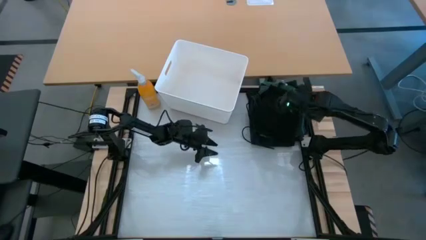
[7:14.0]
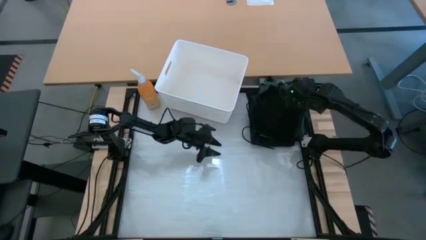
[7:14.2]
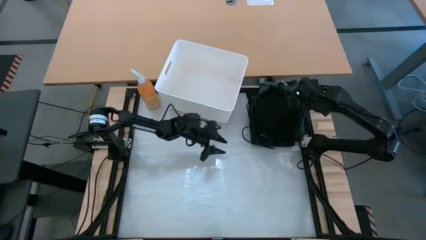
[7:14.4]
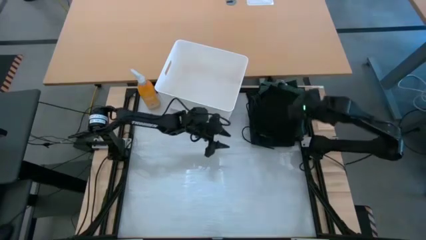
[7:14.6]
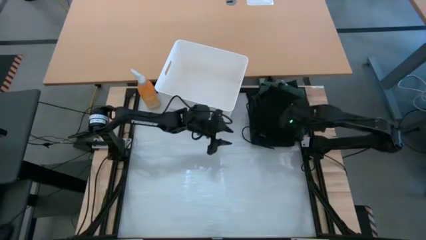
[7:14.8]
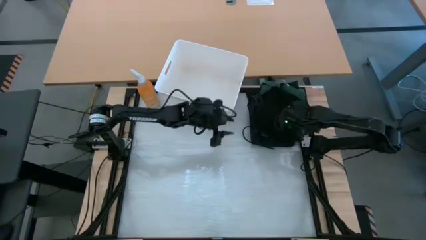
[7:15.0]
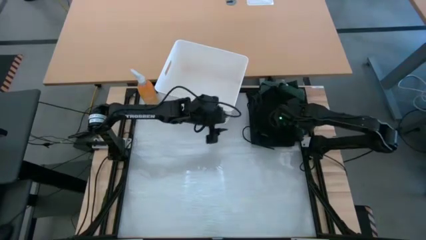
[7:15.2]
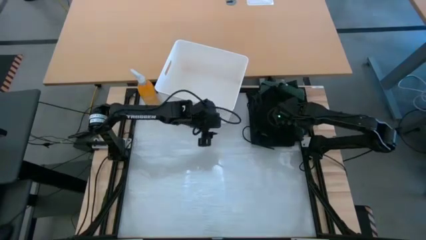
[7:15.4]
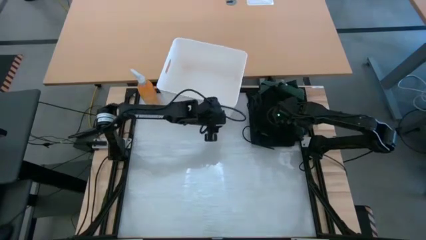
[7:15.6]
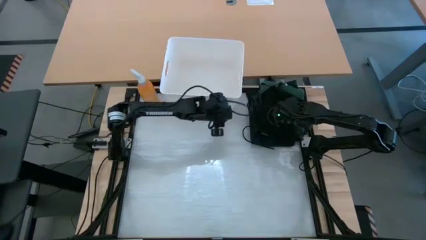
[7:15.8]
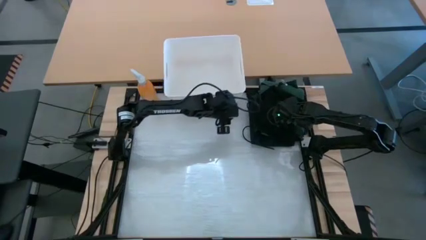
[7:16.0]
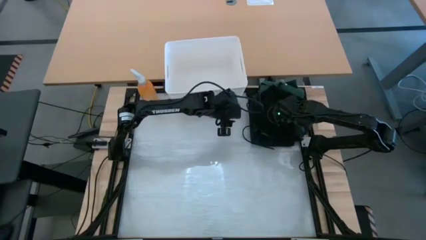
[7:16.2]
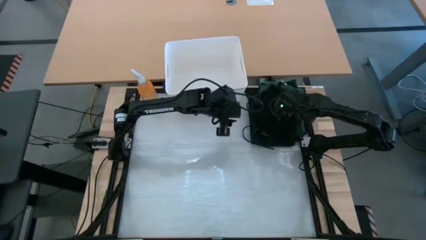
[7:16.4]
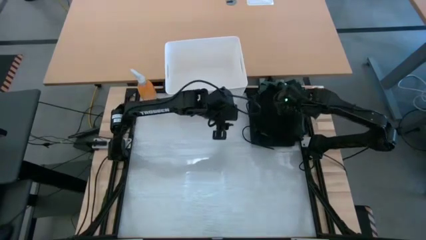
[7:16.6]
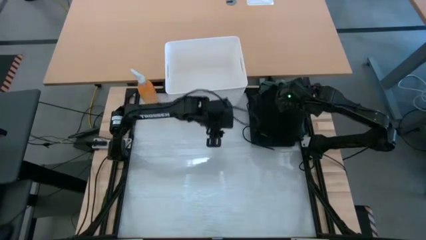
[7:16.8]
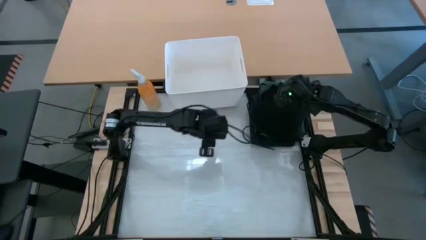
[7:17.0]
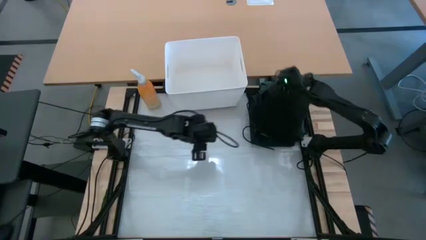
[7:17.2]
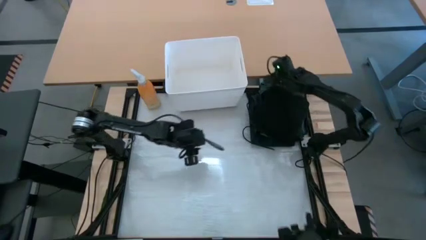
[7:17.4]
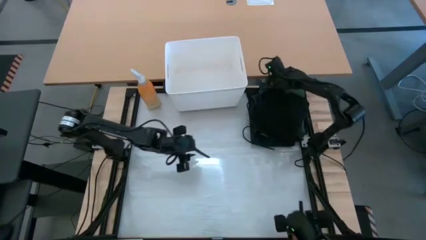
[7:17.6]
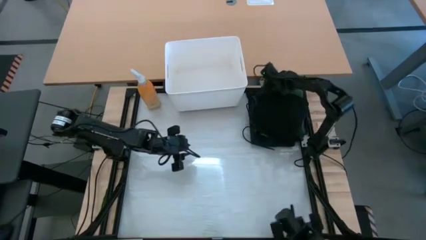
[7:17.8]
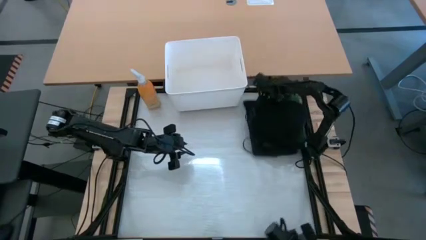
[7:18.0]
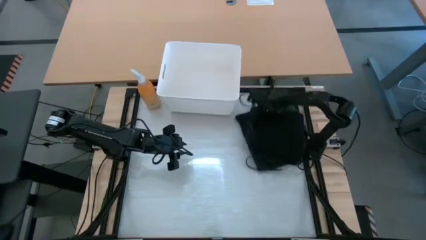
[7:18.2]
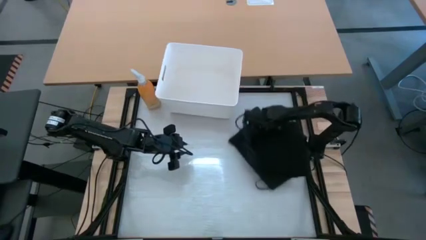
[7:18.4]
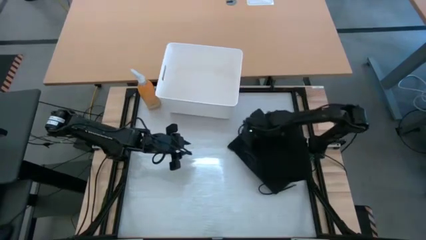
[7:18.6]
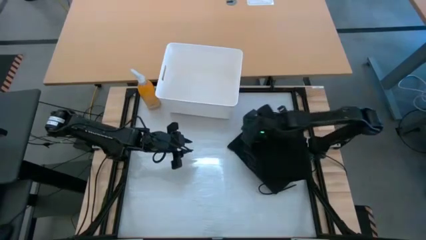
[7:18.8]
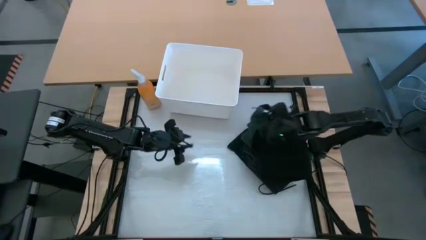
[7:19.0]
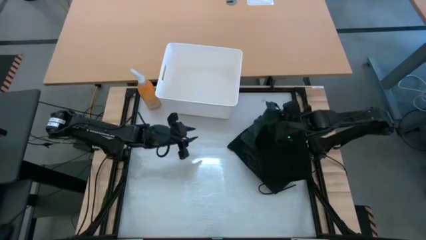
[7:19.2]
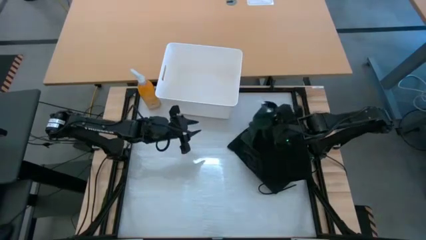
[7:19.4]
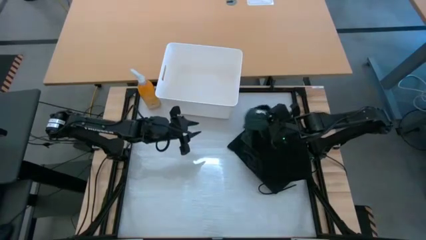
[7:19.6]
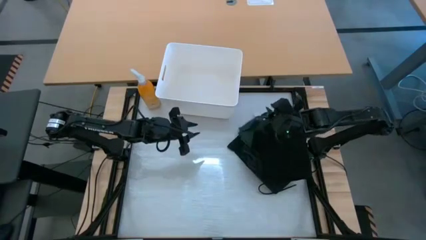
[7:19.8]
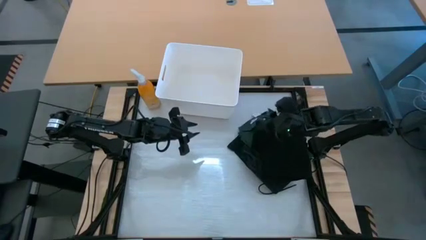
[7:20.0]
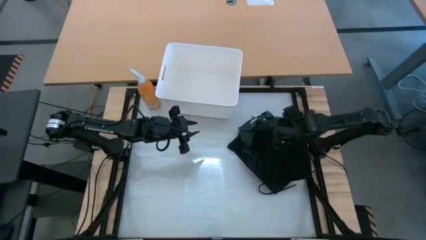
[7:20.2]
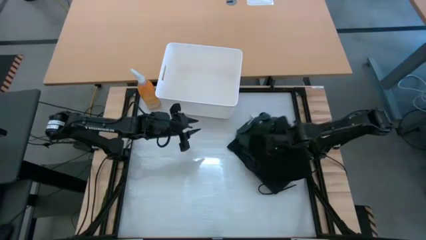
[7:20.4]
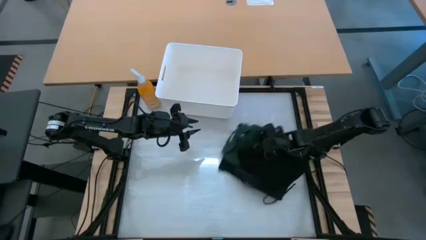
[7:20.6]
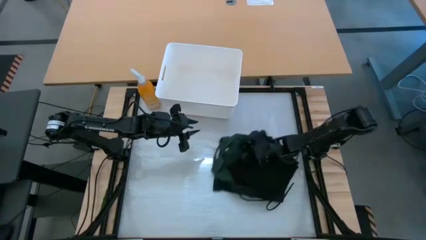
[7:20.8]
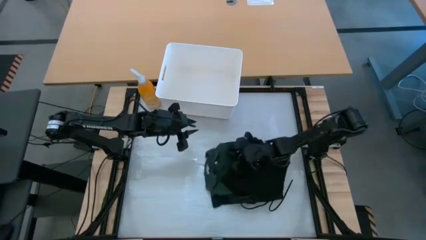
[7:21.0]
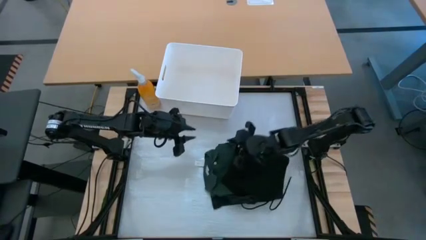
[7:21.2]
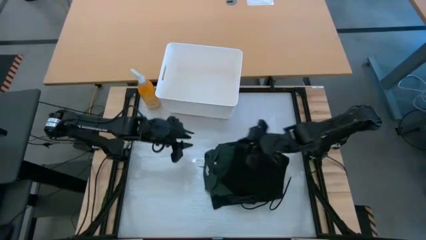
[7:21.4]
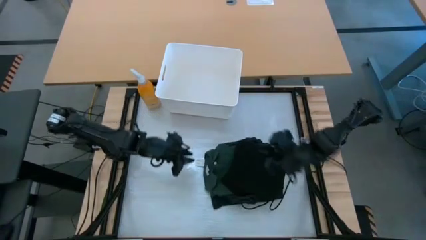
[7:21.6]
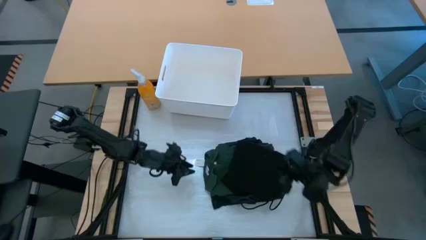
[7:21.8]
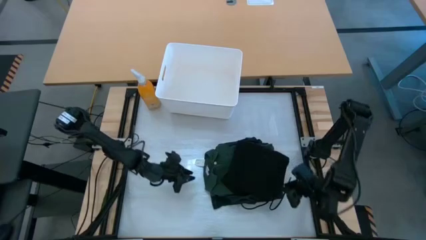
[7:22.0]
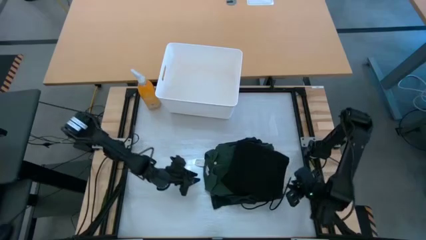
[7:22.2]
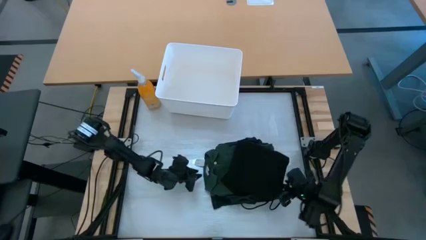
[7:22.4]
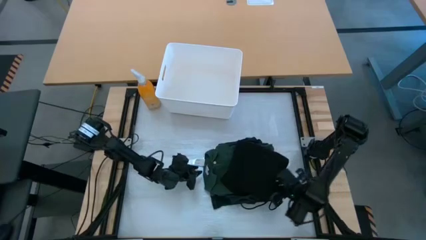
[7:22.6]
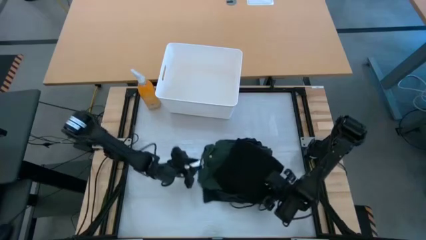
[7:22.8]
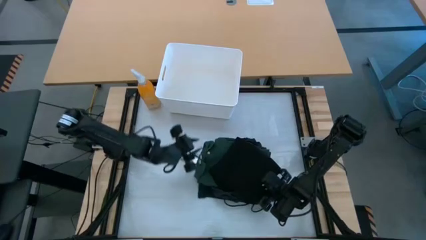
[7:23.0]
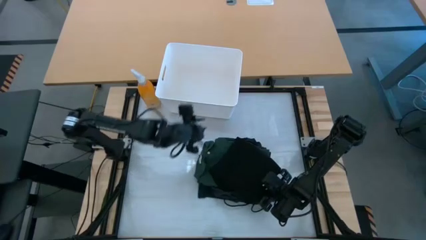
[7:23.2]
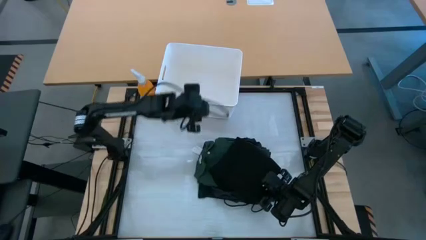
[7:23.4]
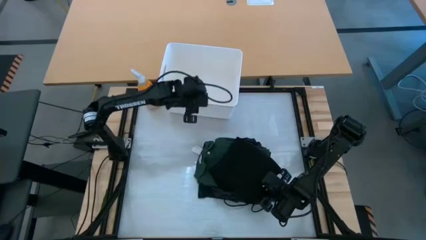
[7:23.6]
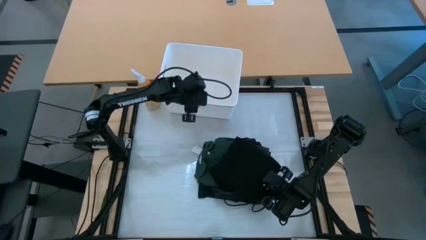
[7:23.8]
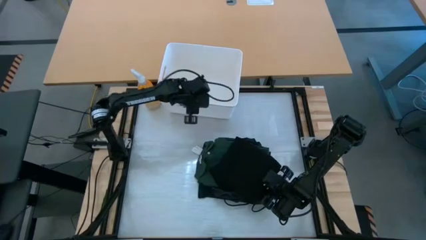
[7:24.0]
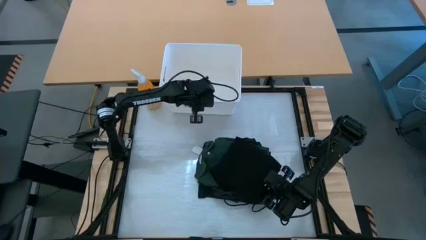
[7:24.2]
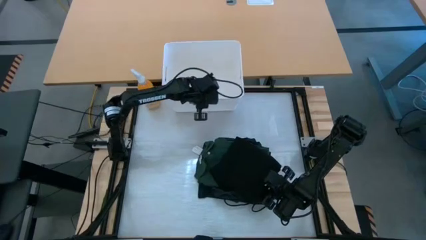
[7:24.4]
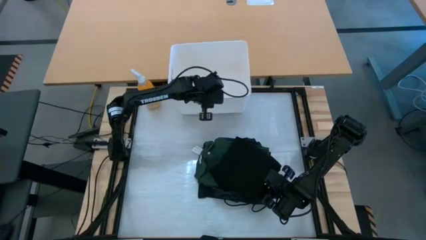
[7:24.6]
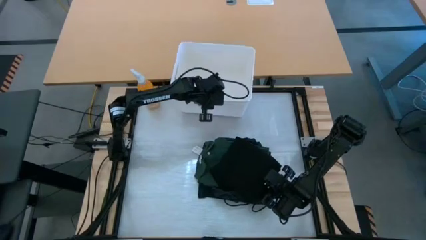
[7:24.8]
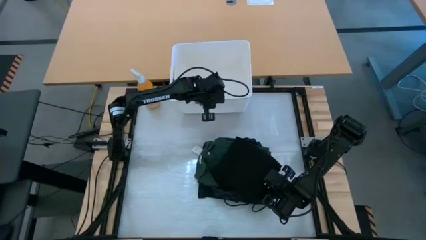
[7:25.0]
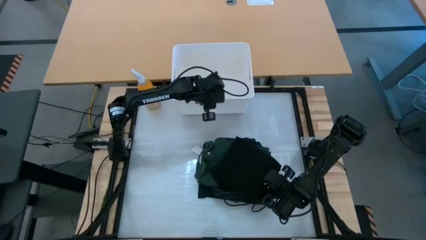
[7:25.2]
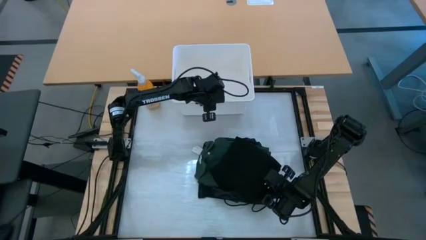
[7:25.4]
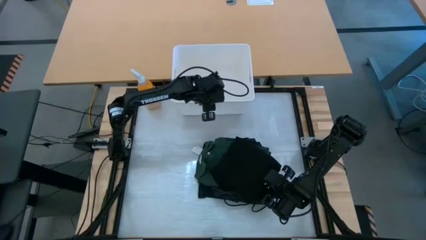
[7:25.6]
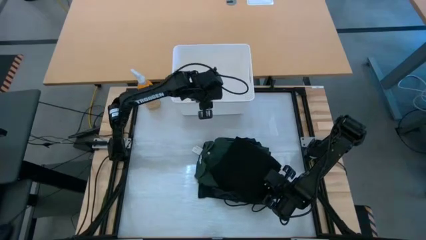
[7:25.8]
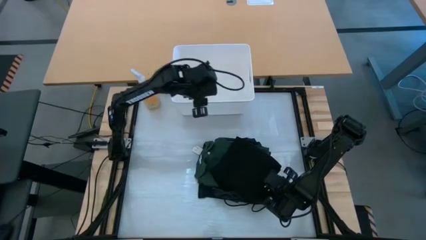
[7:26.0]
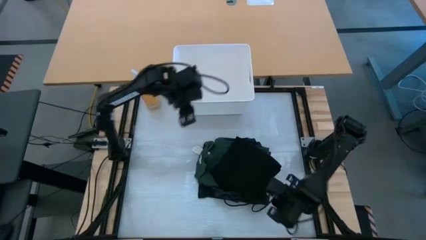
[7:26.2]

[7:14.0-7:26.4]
Task: Fold laundry
Put the stack of clothes into the white bin

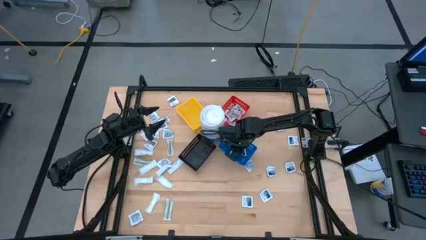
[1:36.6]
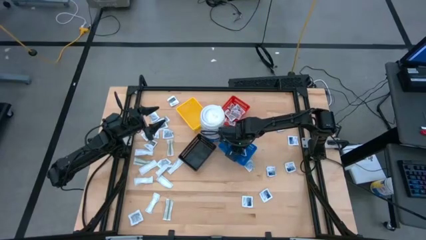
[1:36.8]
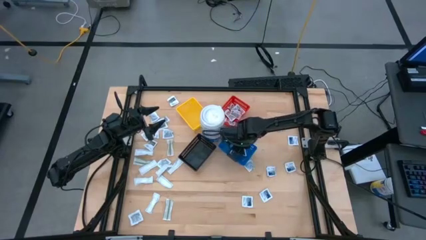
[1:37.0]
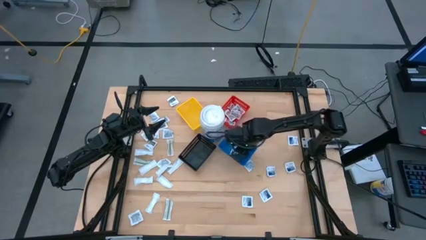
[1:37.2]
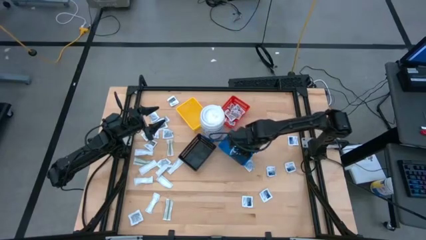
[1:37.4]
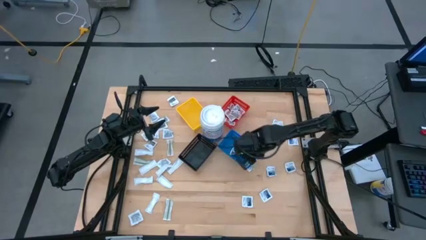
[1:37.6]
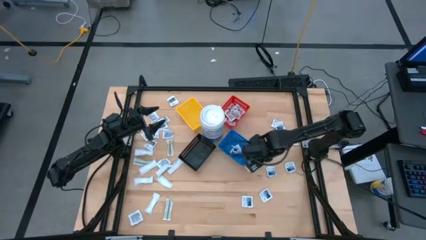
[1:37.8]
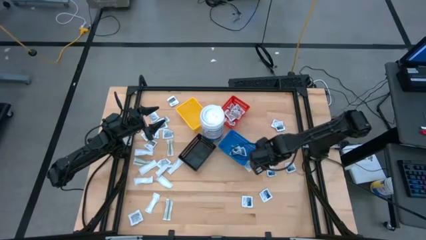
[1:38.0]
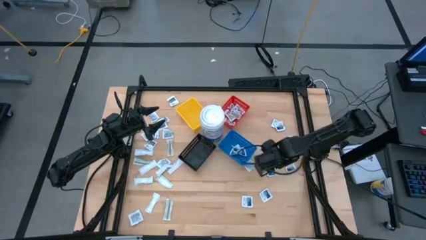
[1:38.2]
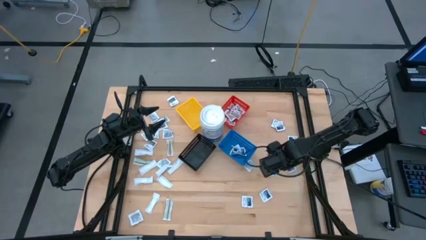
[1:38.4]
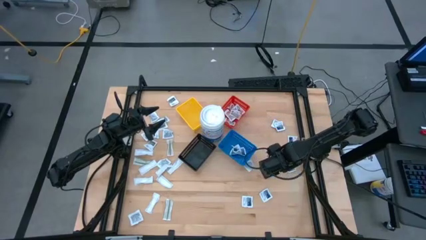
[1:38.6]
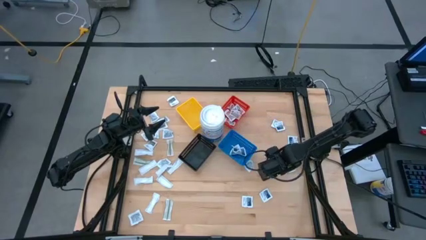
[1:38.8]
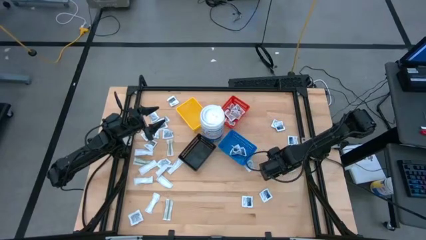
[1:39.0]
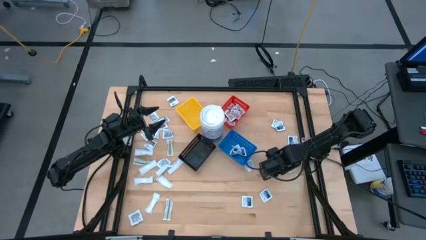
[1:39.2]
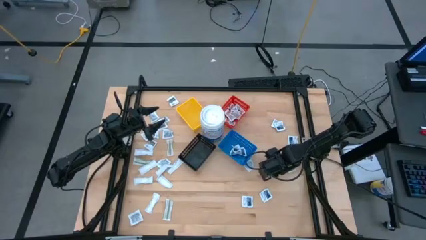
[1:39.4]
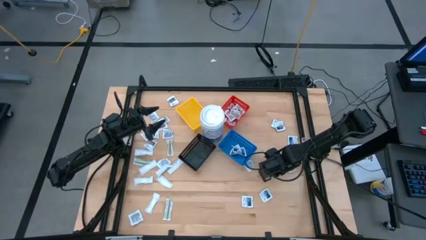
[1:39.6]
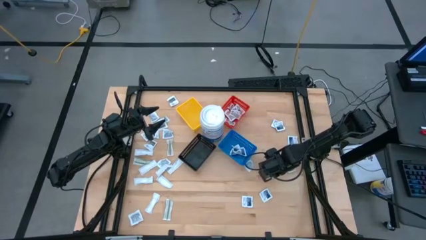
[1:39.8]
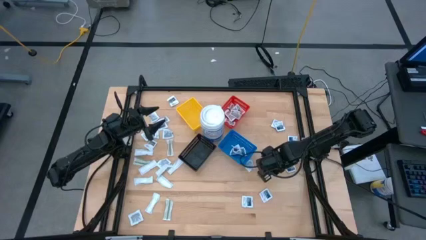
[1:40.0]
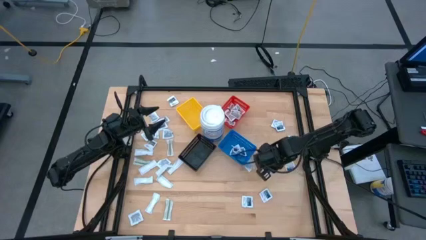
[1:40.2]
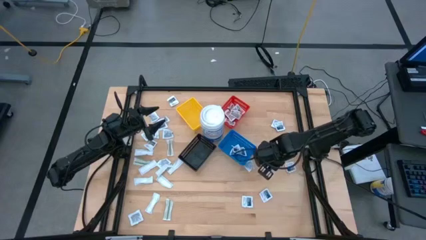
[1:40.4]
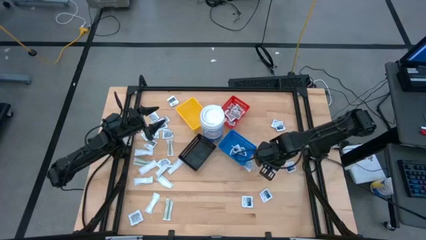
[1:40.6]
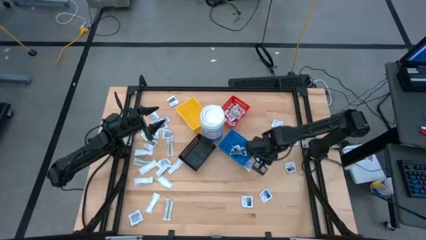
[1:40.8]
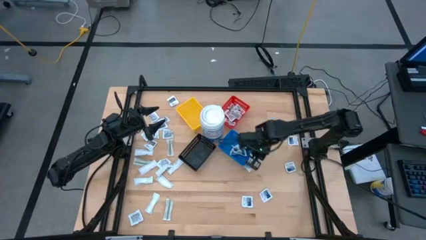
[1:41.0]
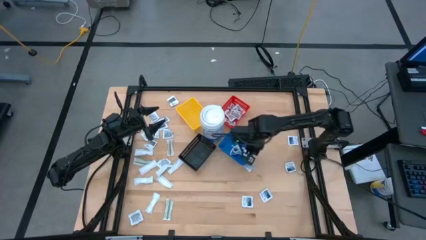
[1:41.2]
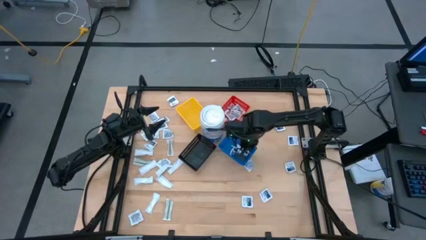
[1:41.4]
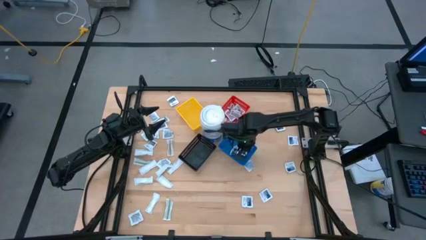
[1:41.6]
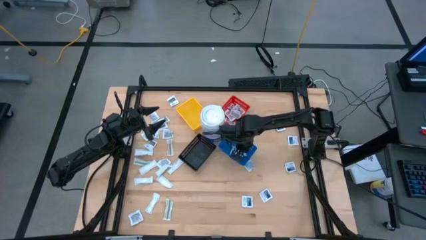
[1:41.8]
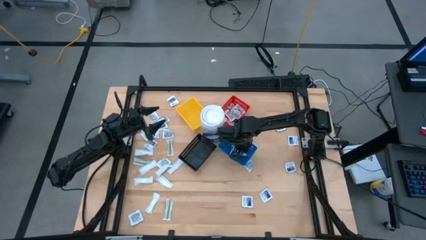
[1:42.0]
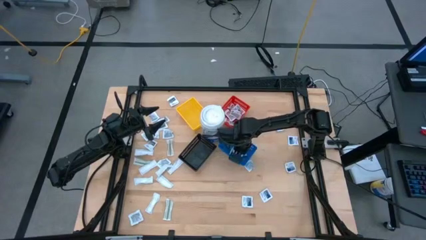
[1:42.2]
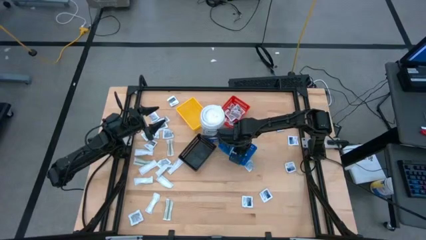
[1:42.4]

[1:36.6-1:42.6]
Task: Pick & Place First Aid Supplies
Put the alcohol pad into the blue bin
